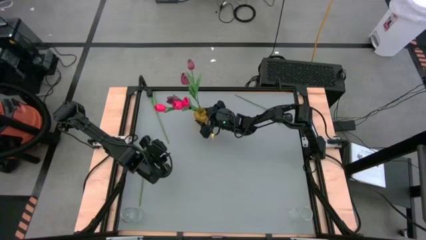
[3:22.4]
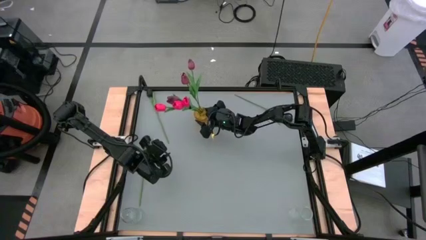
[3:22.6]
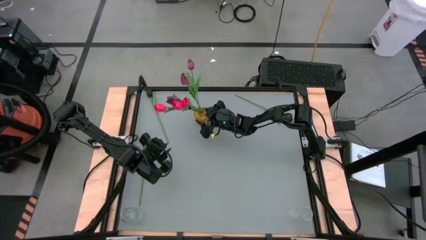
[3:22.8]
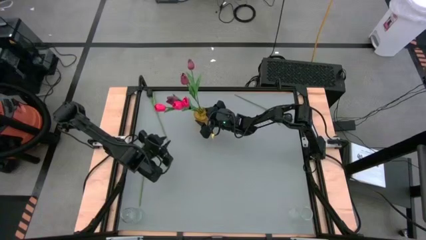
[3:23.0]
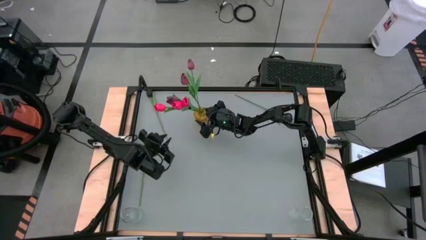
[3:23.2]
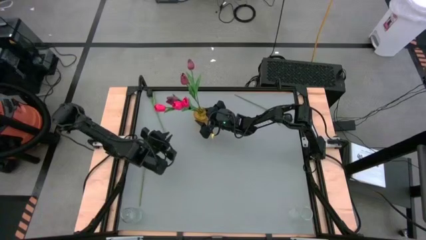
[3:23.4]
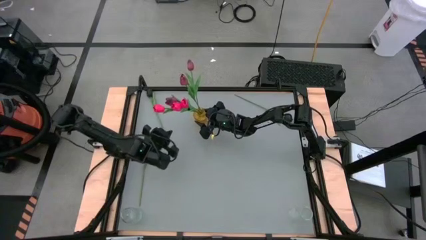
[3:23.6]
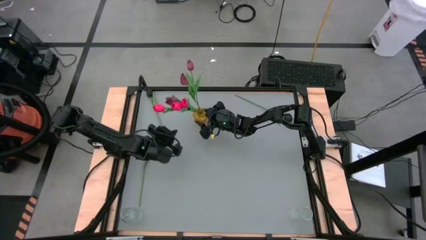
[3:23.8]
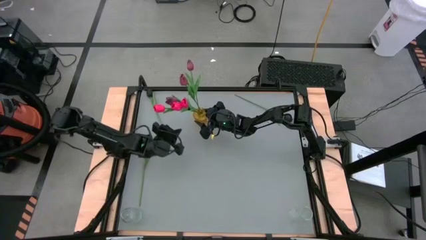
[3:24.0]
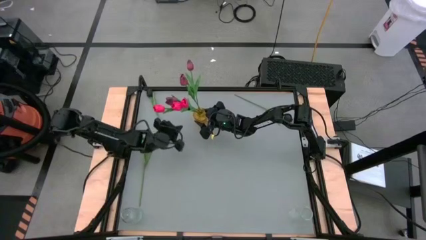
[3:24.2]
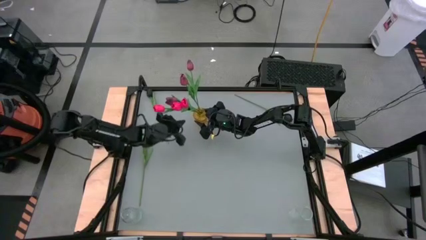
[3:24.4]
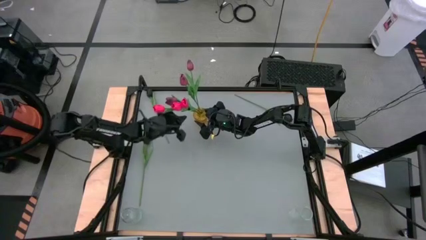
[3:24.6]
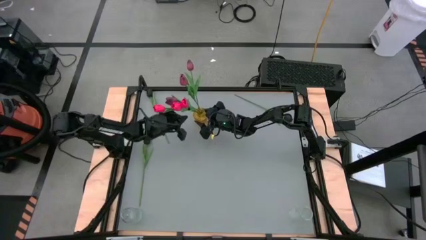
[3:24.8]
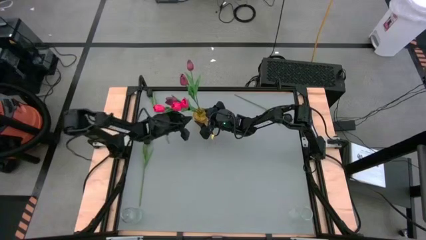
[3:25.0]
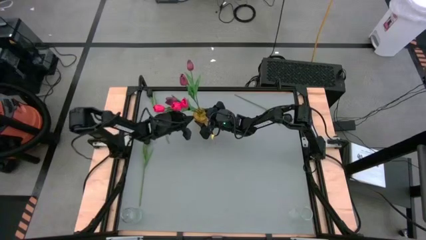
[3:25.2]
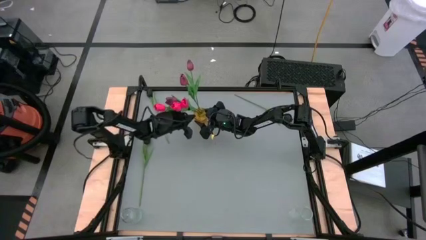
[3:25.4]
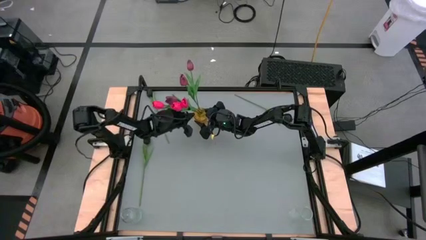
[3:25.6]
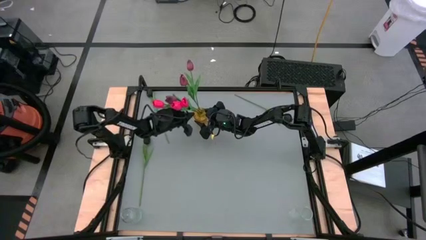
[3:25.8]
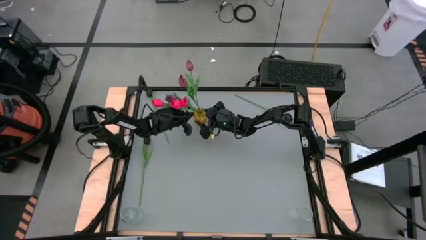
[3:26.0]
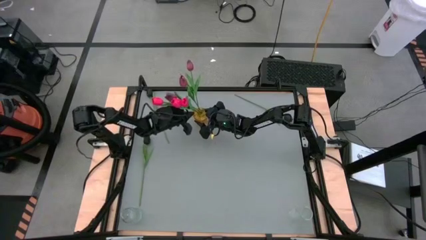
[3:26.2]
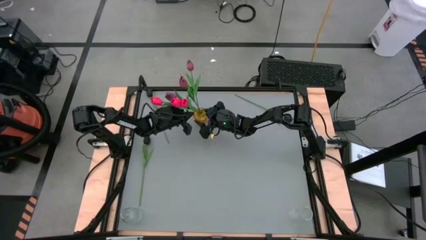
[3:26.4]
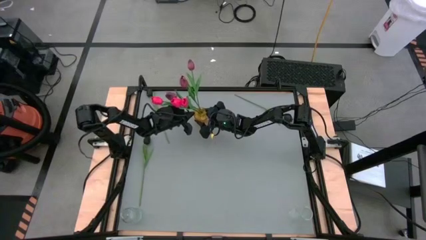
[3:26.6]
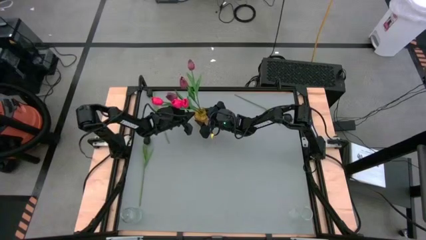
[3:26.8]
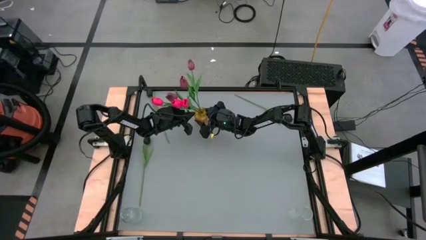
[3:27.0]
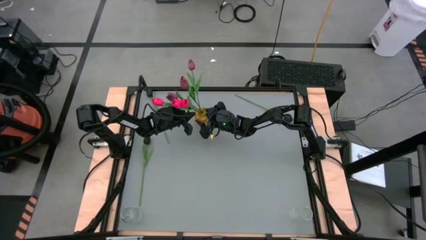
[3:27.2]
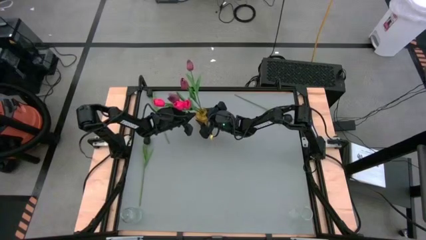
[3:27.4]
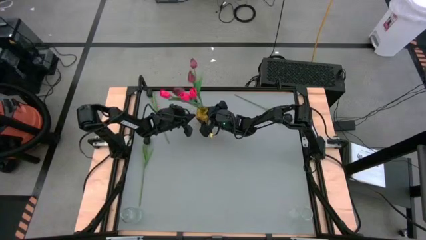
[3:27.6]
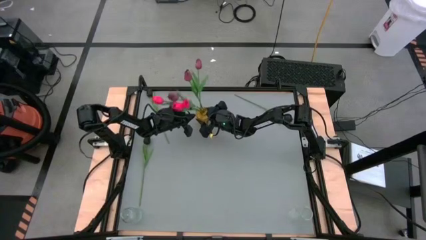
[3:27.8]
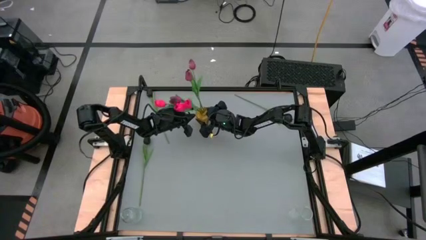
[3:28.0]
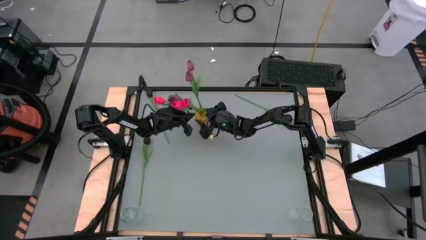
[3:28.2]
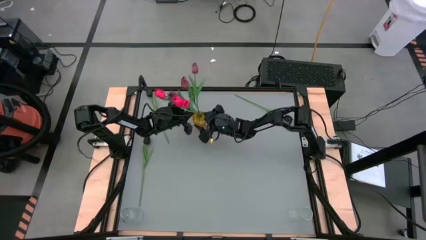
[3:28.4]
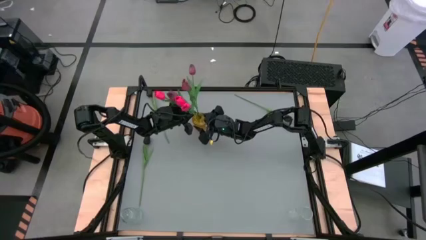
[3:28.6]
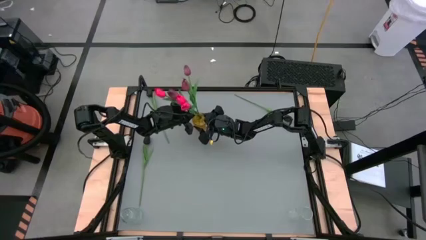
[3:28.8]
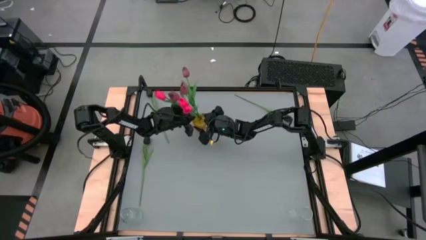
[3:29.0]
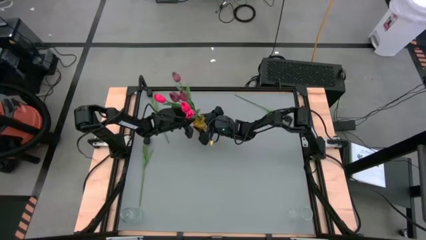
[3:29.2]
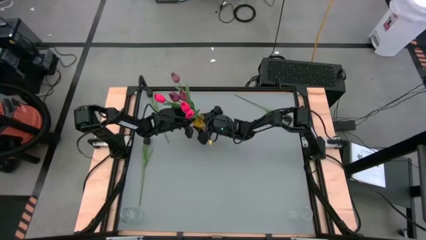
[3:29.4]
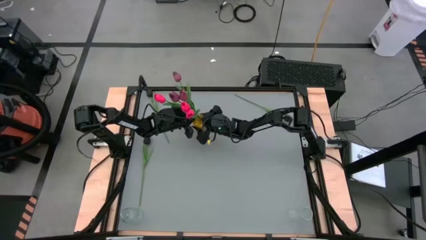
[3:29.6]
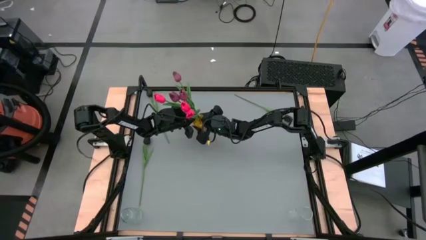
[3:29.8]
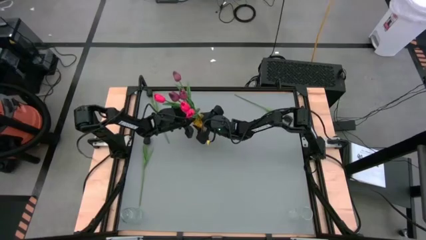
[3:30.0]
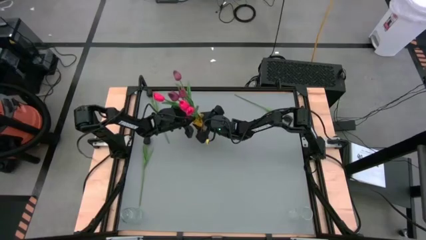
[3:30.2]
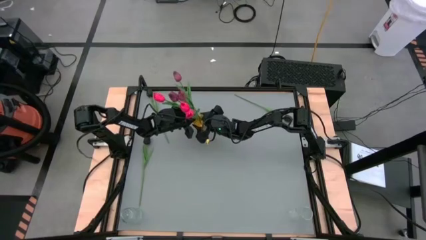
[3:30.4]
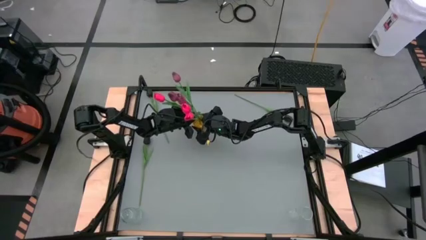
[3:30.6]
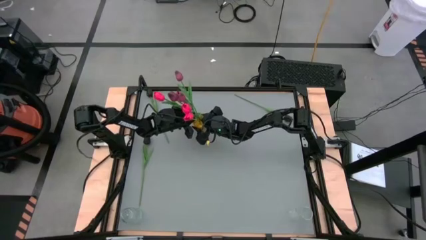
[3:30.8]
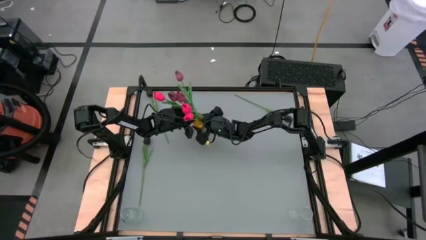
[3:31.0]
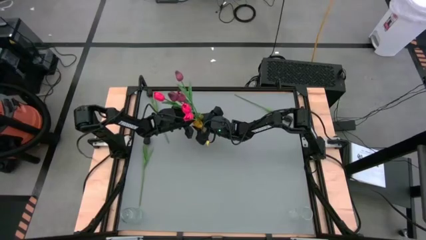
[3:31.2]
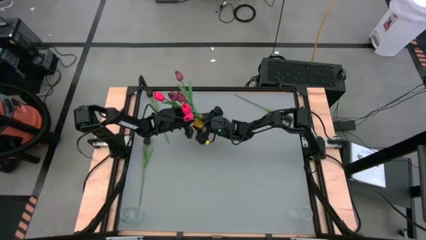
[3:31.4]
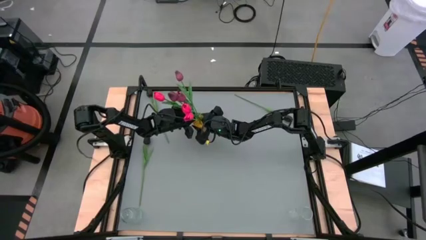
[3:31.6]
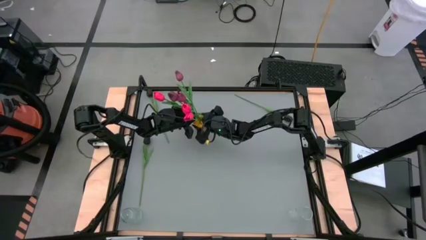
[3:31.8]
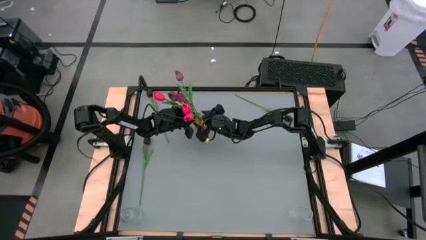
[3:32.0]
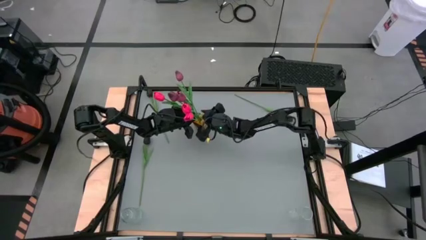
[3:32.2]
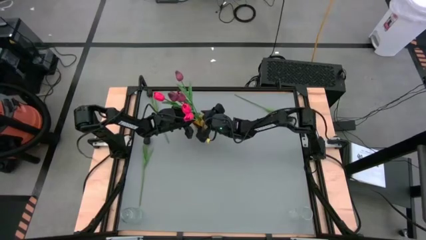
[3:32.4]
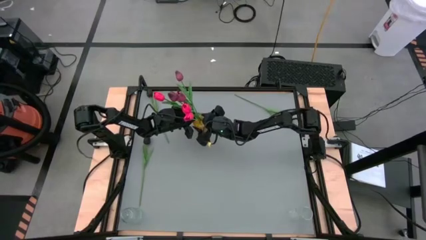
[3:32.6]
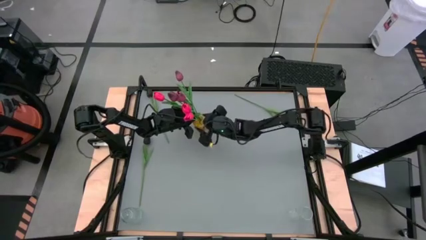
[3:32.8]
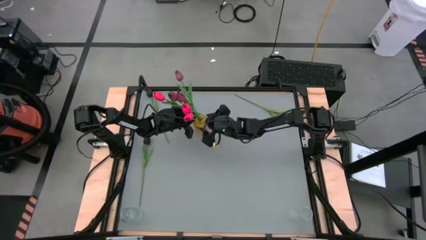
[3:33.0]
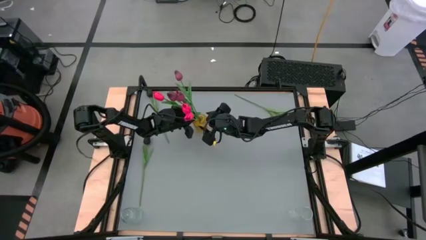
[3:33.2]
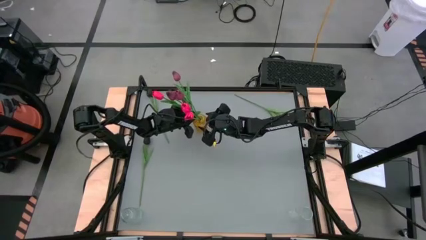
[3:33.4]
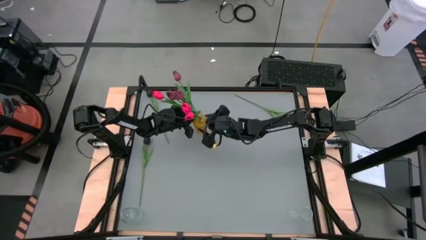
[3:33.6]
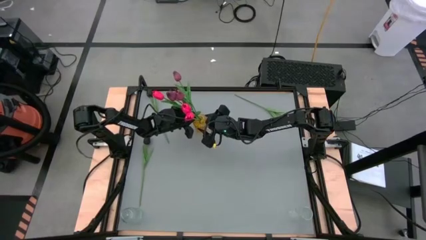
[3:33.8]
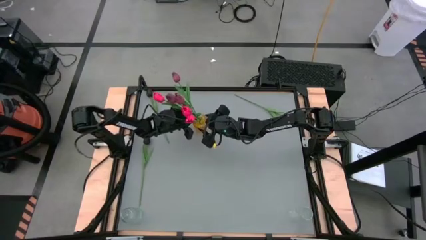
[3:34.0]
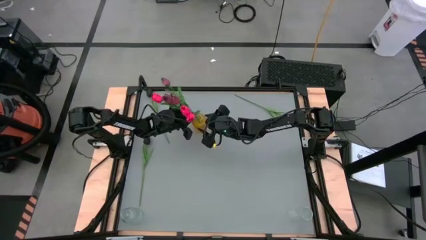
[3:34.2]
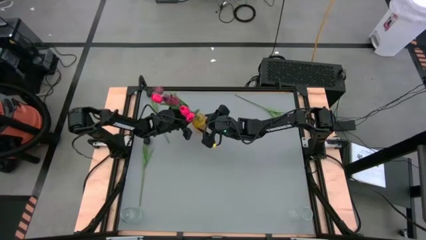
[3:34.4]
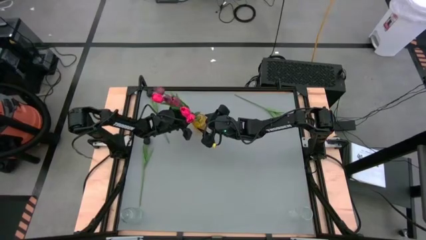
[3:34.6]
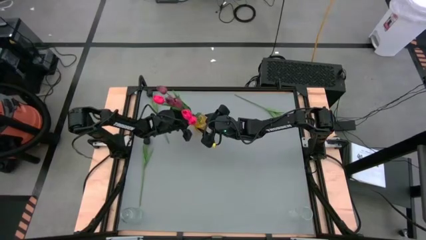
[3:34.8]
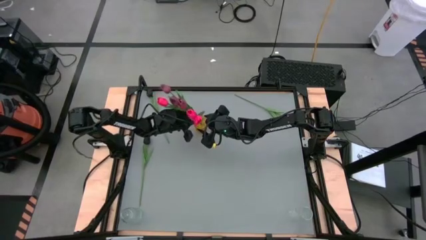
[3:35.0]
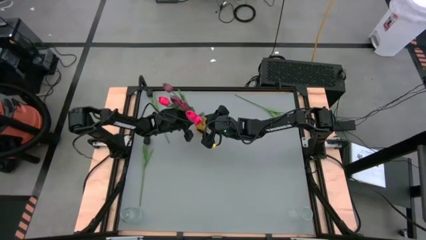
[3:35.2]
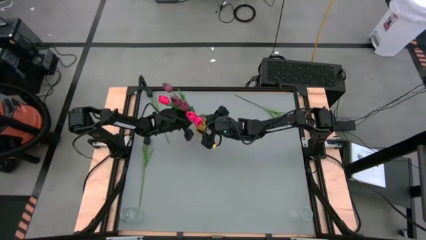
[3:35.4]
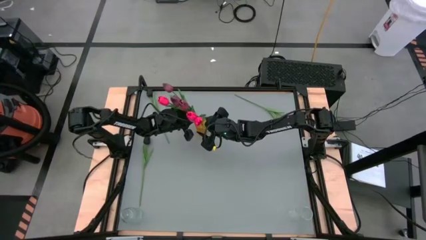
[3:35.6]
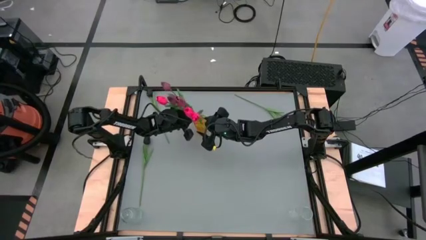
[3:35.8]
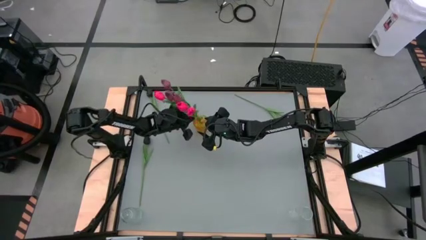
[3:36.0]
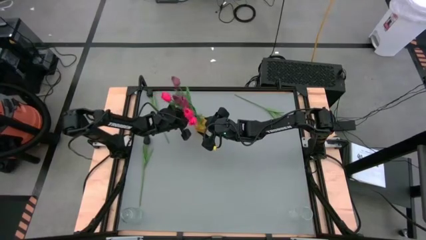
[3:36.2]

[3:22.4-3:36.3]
Task: Sort flowers into vase by color
Move the yellow vase to the top of the table
